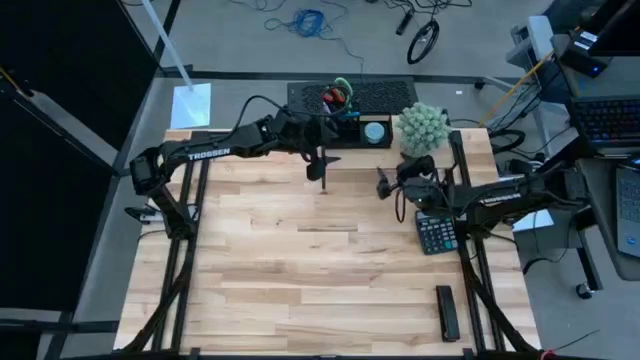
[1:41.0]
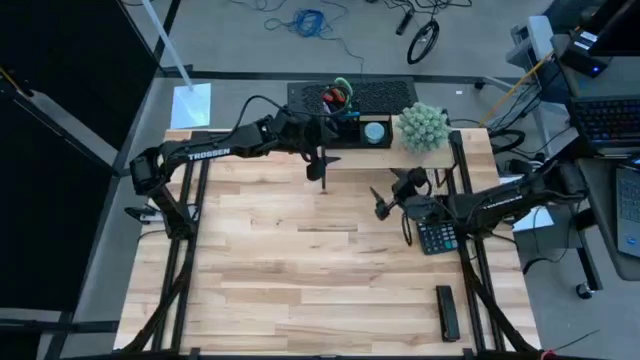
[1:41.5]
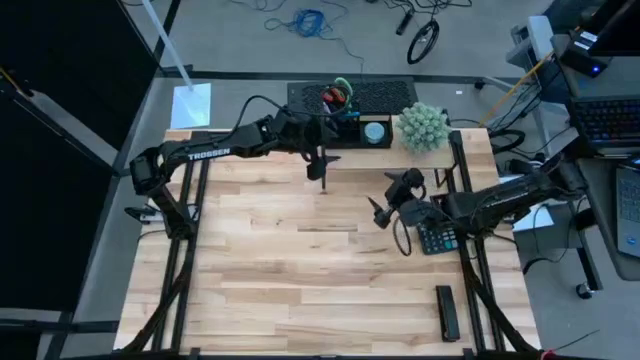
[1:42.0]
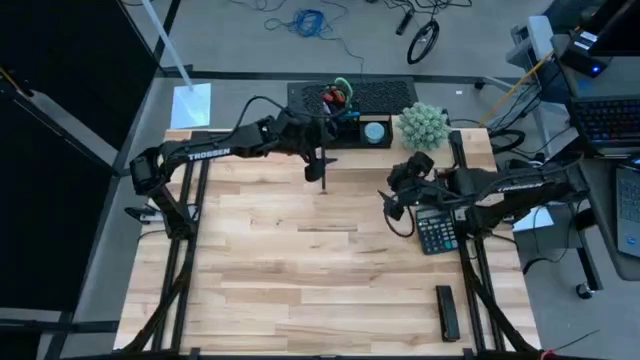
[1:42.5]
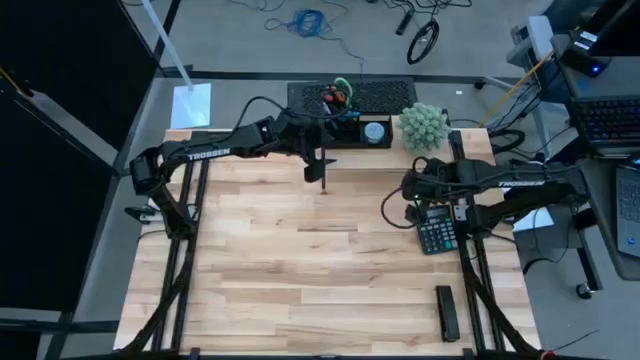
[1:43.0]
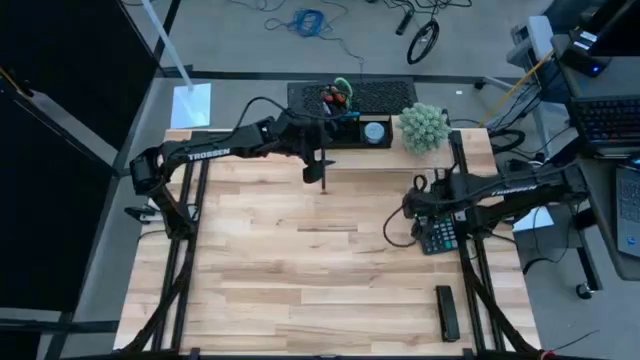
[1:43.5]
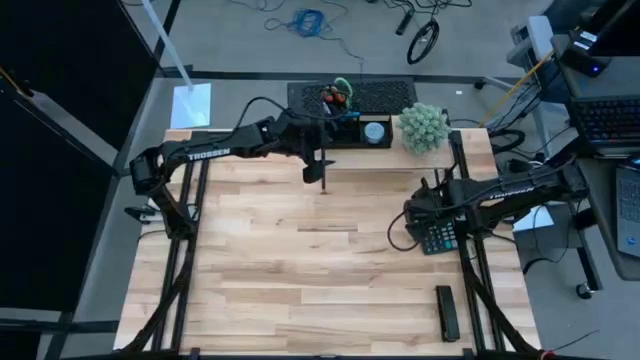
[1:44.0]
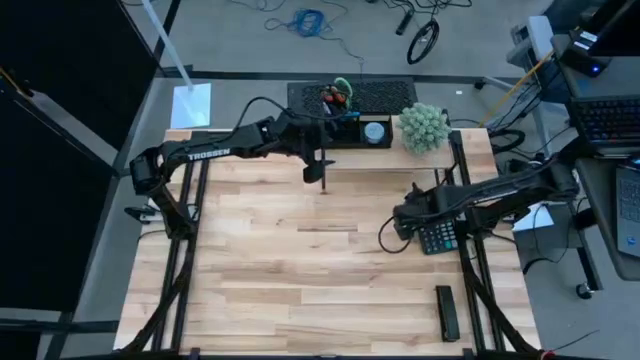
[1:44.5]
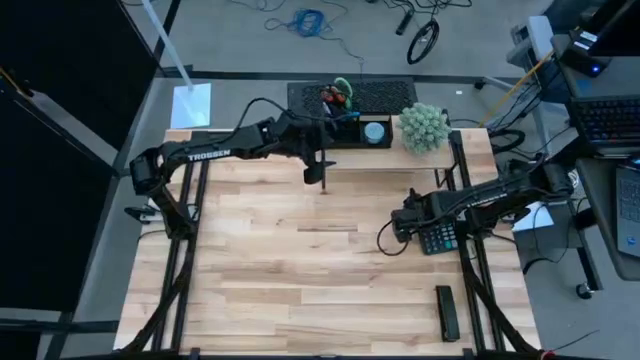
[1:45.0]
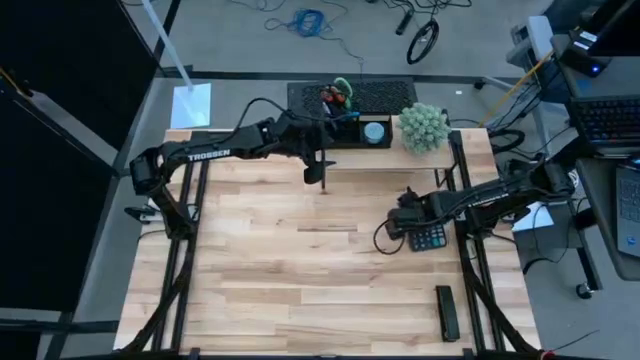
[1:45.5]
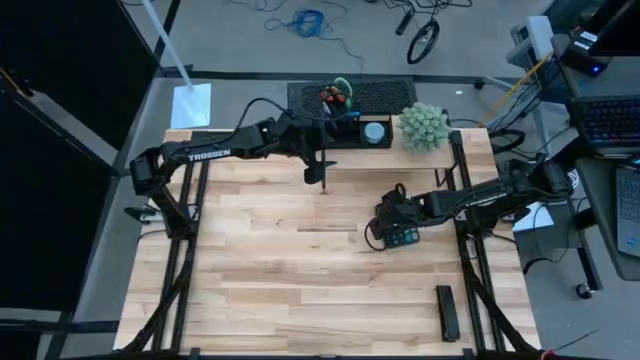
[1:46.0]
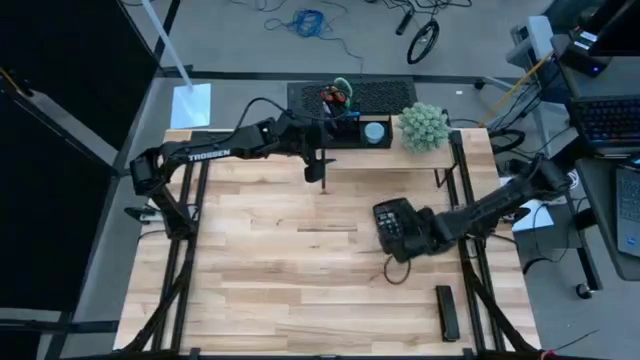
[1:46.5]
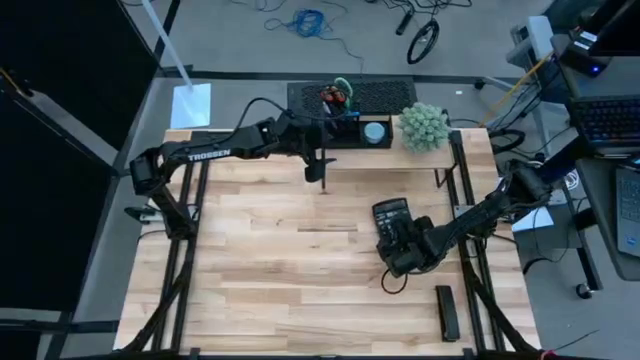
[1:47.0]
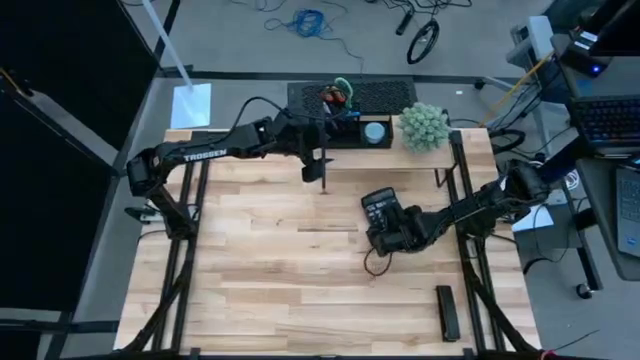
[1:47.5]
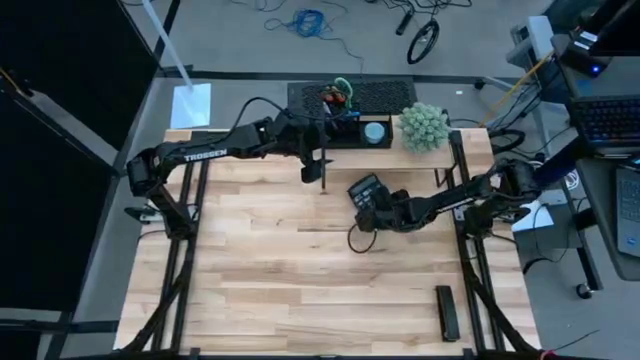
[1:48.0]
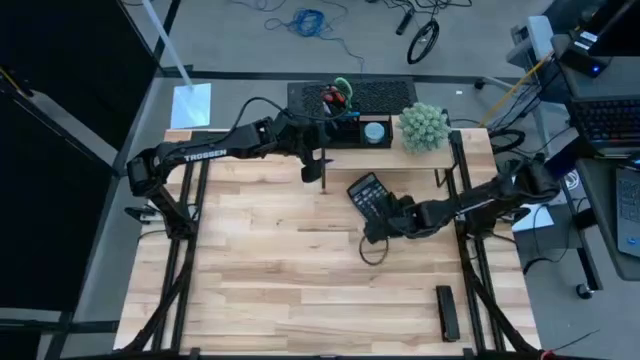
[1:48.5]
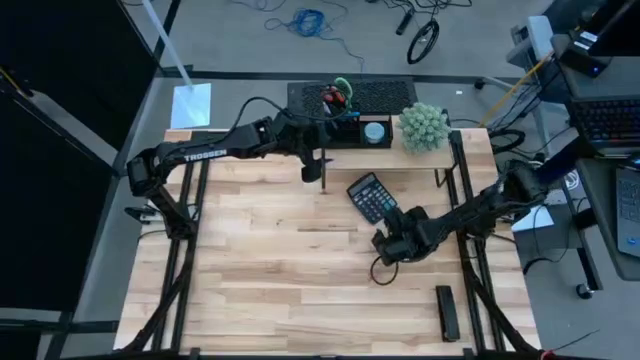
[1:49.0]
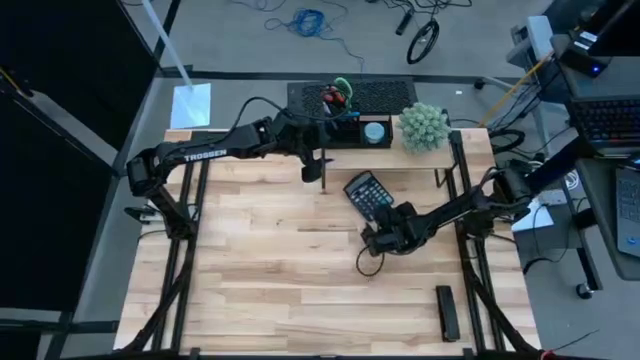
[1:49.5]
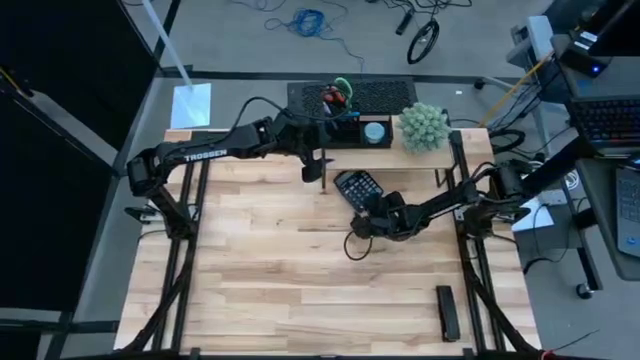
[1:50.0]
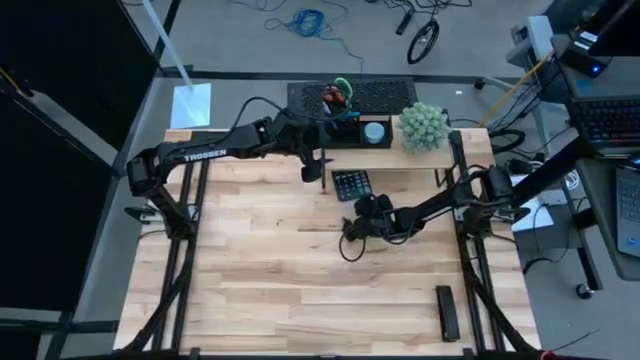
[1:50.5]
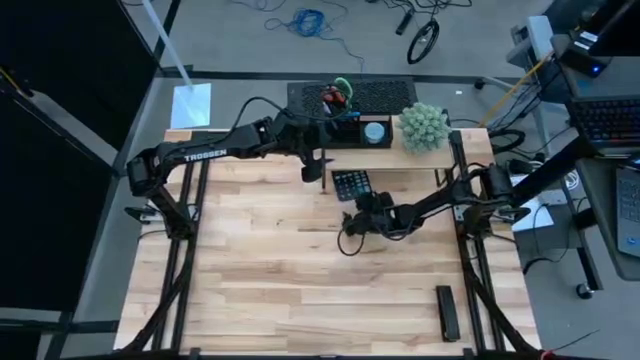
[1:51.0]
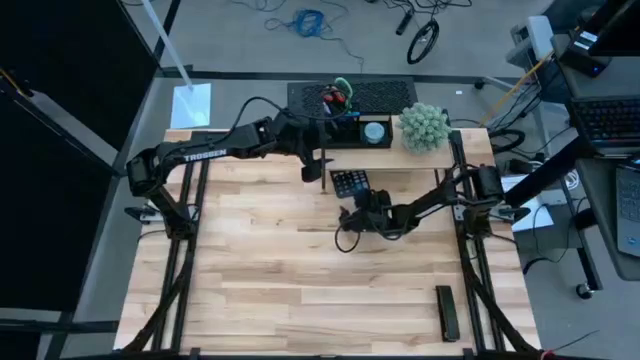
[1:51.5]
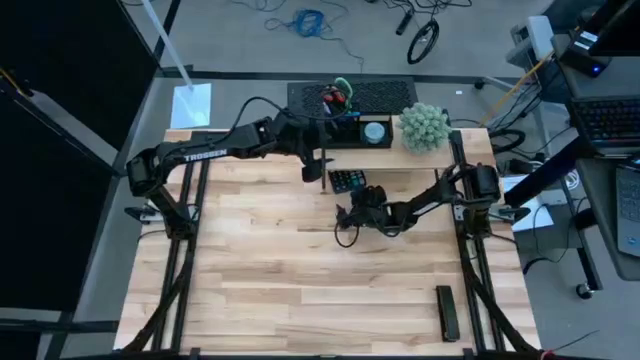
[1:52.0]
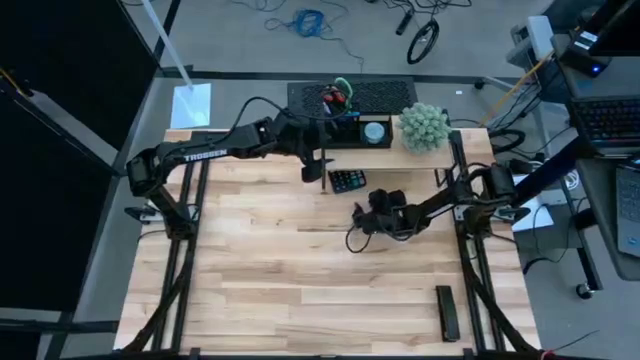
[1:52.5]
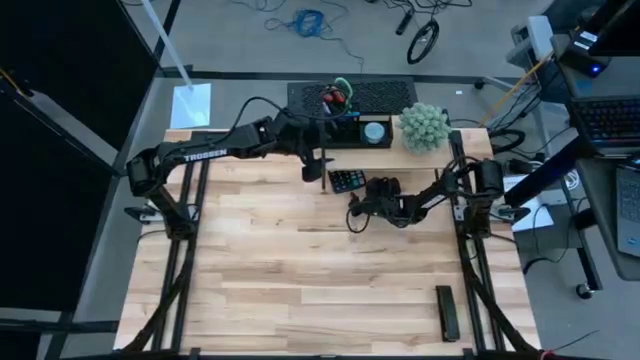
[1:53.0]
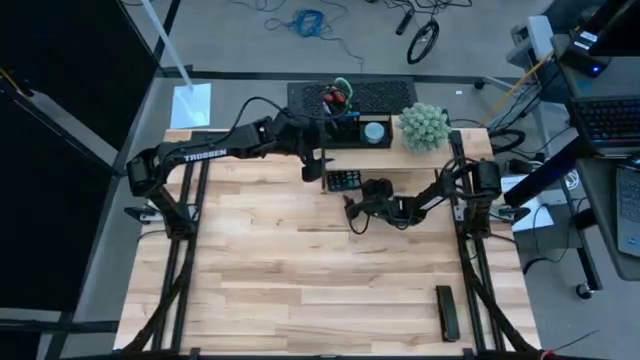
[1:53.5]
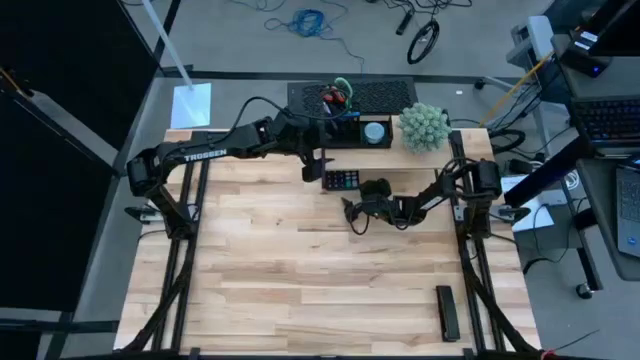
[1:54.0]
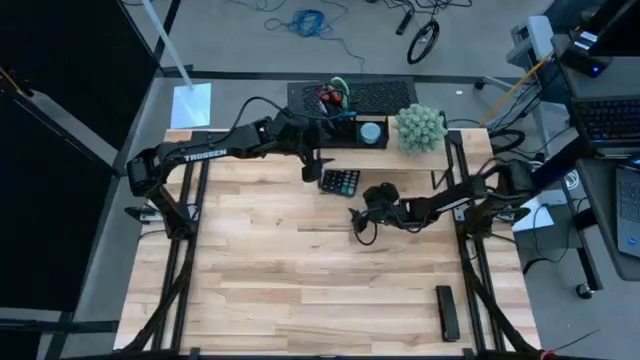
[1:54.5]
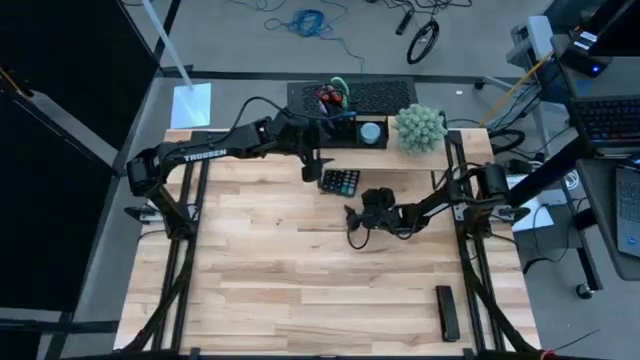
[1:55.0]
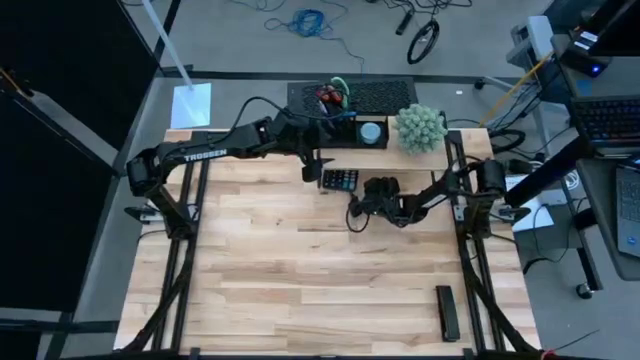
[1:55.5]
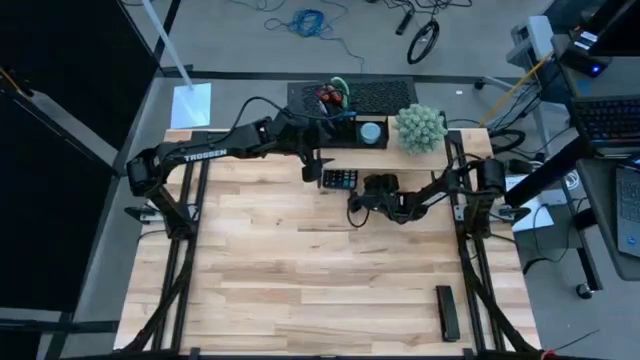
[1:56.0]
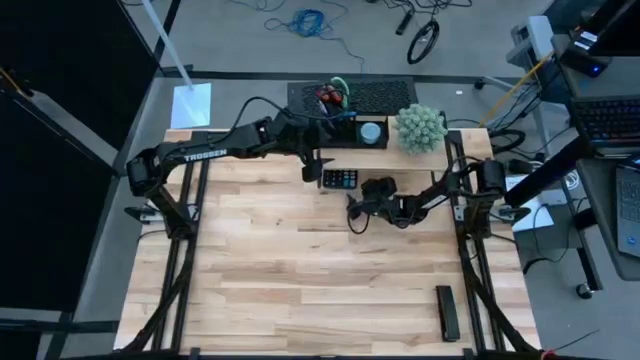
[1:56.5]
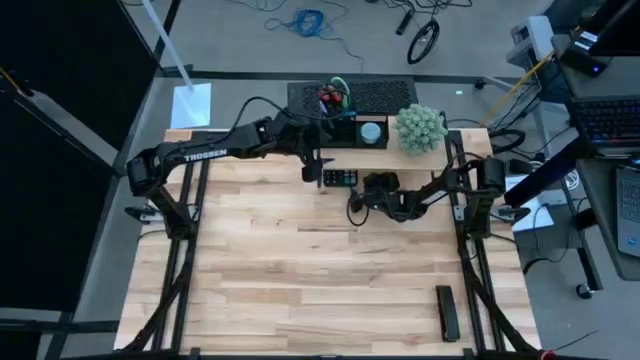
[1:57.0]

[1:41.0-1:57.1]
Task: Pick and place office supplies into organizer
Put the black calculator under the wooden shelf
